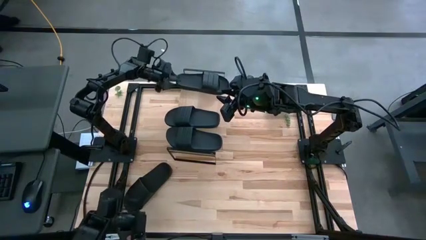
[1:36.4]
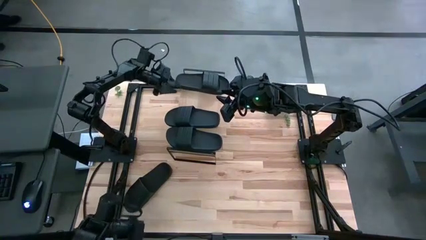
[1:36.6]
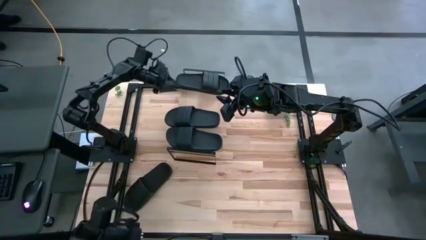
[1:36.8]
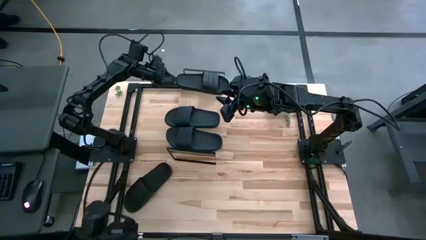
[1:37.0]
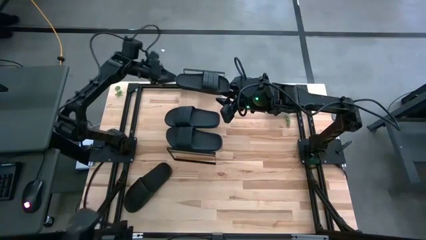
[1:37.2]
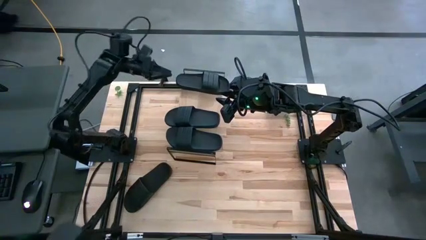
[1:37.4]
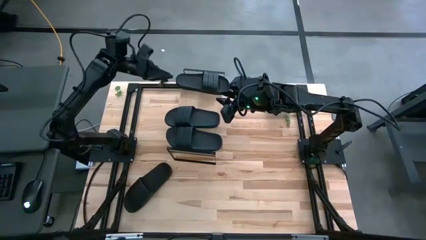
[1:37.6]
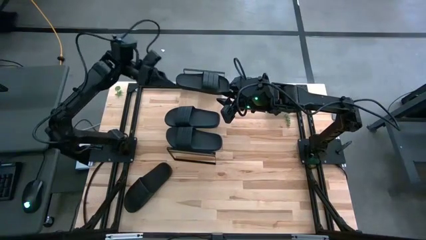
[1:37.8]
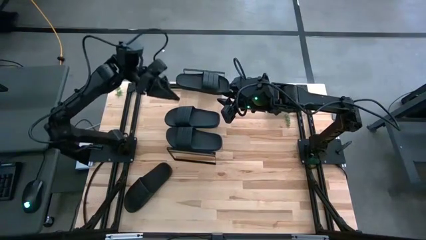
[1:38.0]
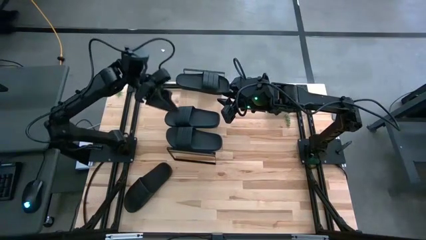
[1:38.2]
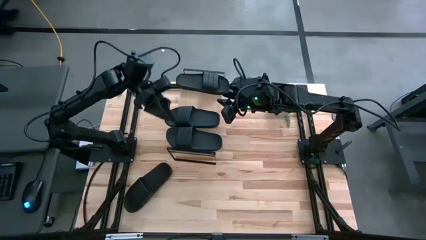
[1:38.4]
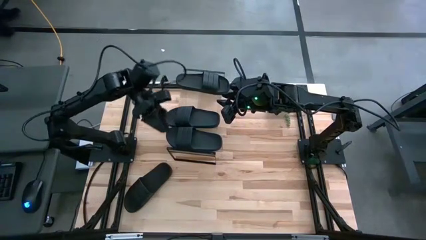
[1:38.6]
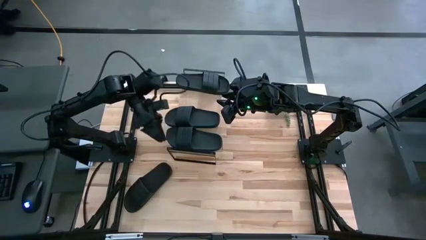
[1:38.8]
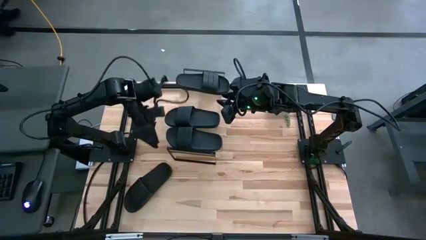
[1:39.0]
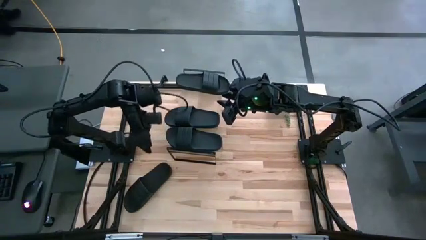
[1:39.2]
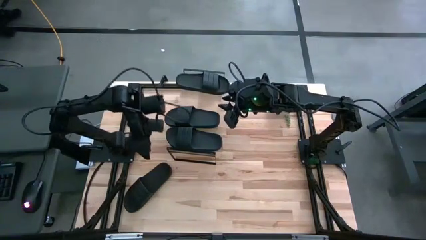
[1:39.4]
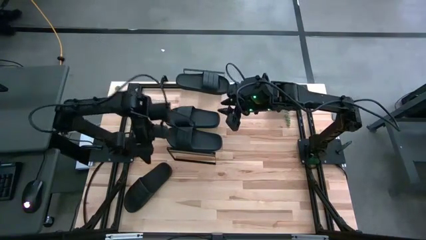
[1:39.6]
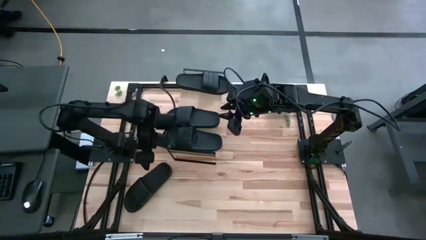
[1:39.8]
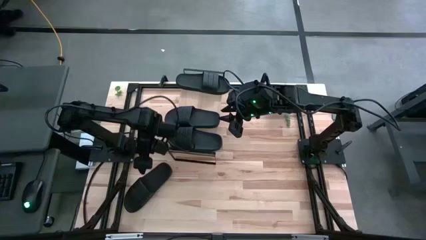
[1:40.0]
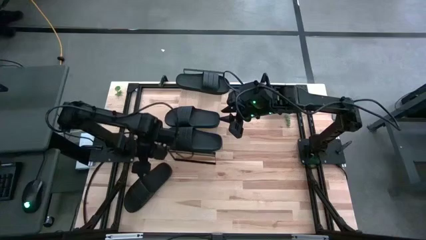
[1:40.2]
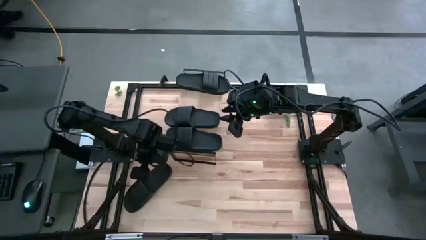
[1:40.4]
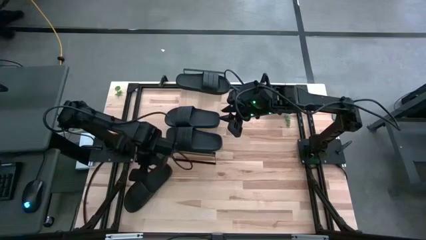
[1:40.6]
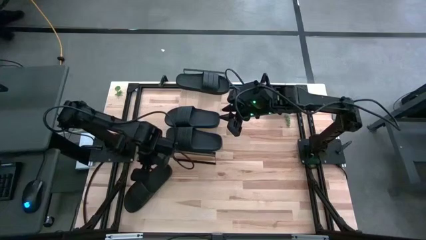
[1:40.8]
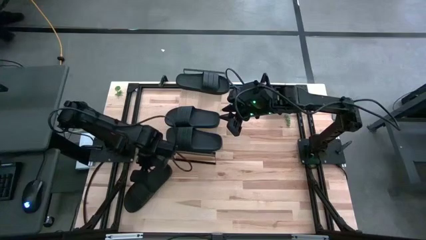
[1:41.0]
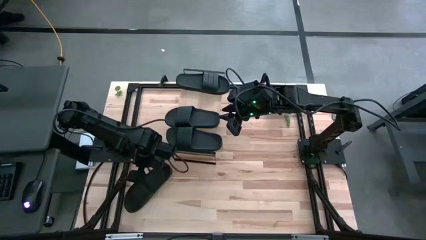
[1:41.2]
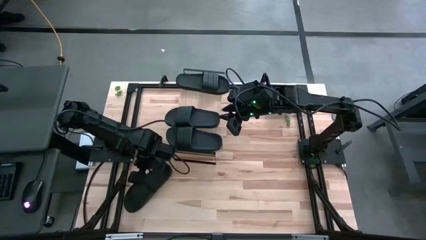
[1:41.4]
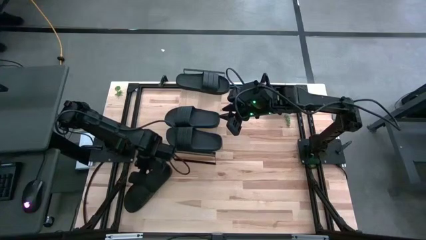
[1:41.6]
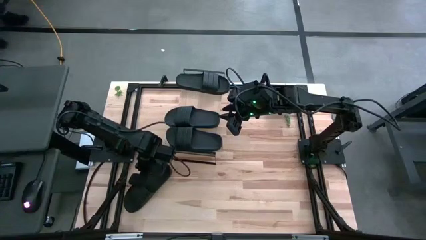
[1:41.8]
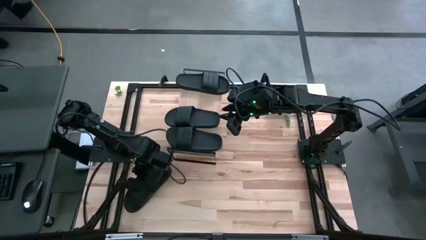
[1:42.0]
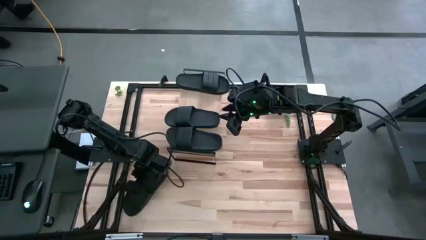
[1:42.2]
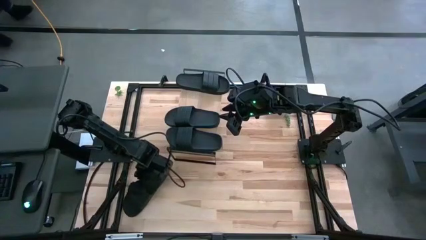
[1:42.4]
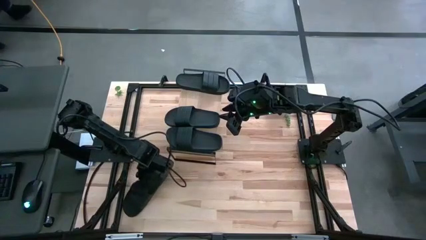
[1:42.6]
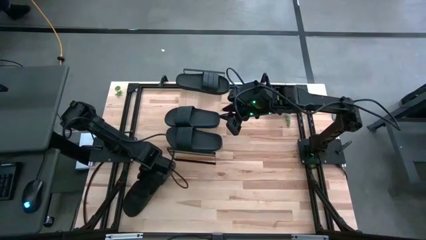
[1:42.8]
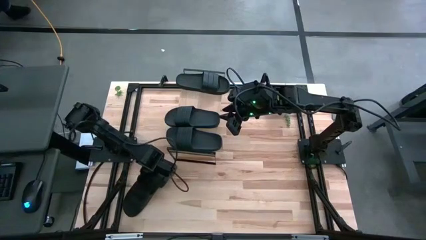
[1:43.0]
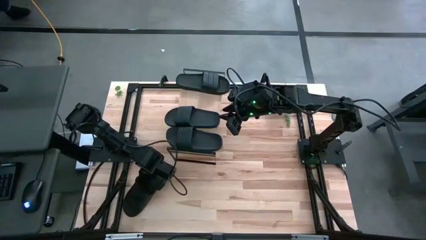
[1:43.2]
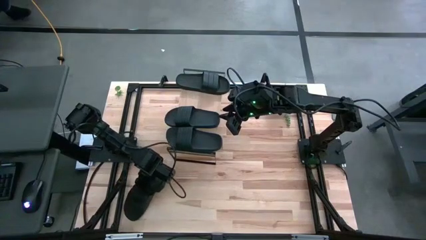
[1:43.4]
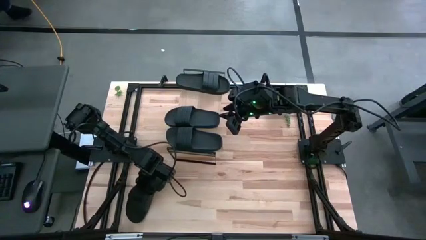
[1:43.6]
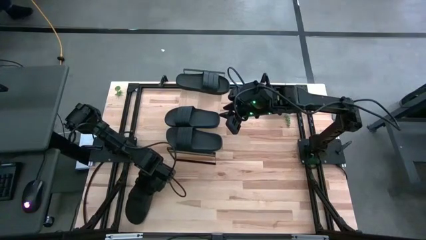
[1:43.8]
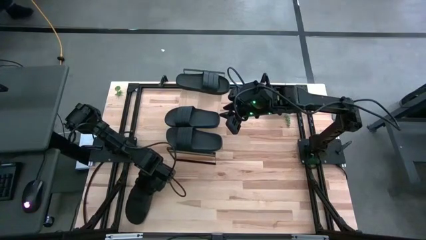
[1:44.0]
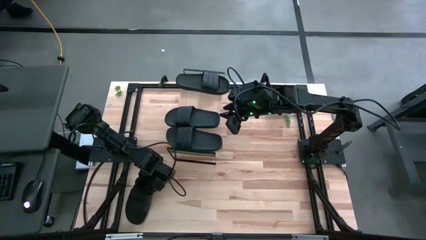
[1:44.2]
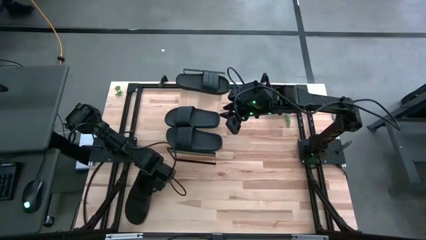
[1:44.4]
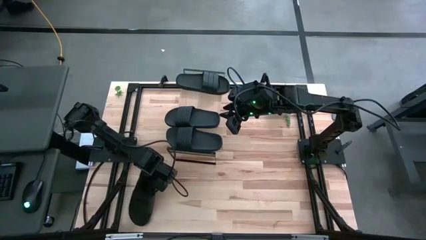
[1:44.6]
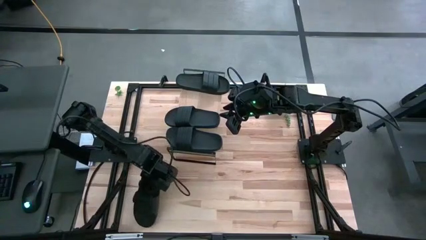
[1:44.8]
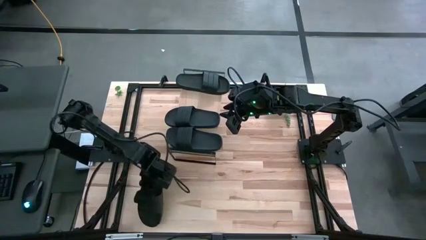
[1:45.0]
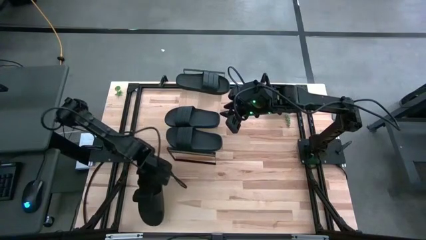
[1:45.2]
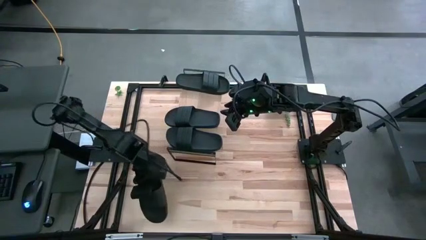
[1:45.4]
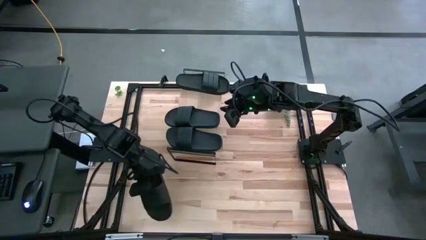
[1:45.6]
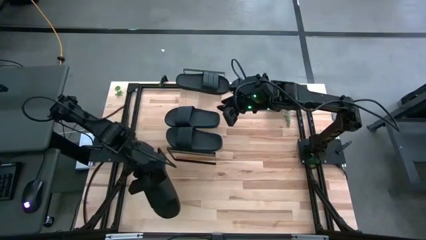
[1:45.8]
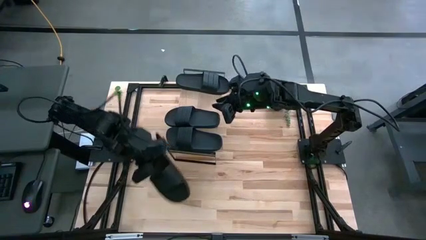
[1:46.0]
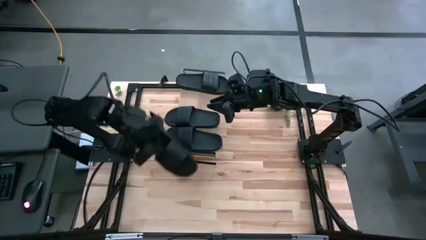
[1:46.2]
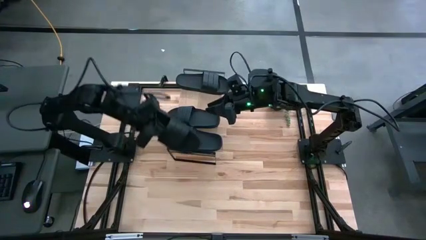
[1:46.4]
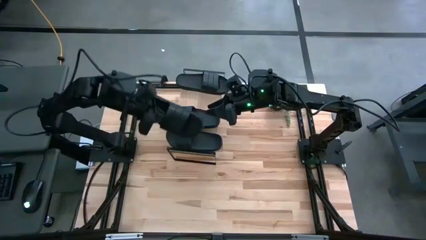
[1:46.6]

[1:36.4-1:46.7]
Task: Pick and place slides into the shelf
Put the slipper on the shelf

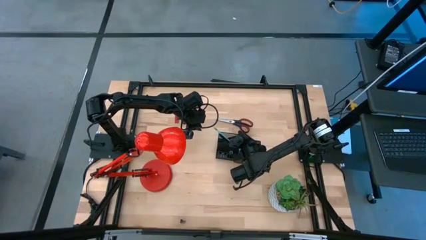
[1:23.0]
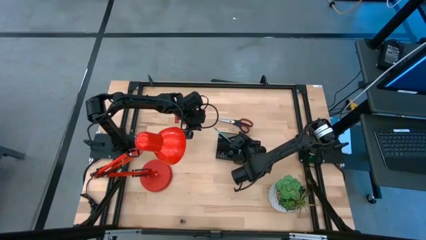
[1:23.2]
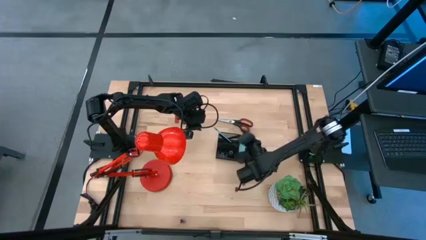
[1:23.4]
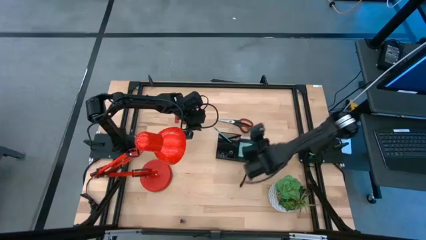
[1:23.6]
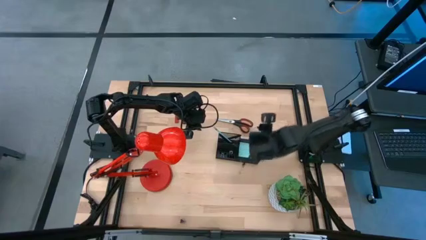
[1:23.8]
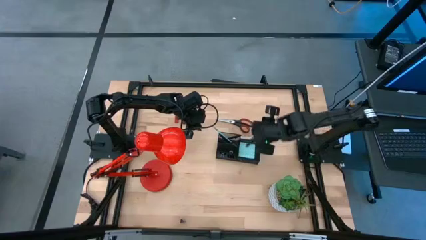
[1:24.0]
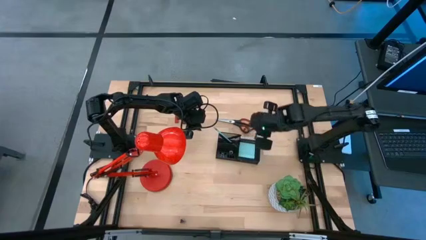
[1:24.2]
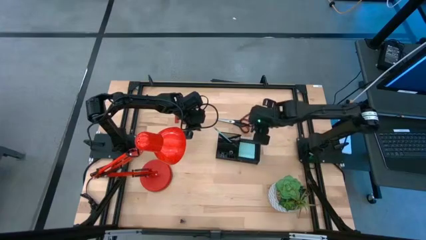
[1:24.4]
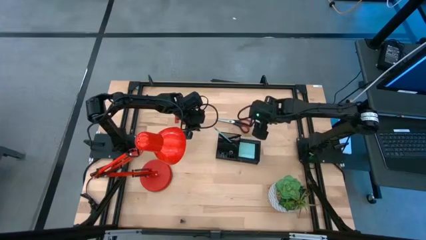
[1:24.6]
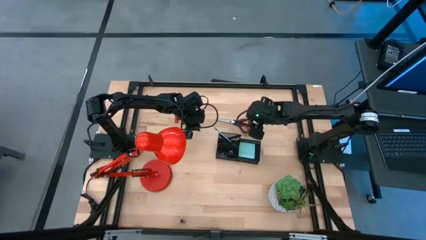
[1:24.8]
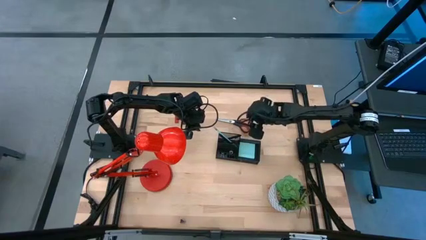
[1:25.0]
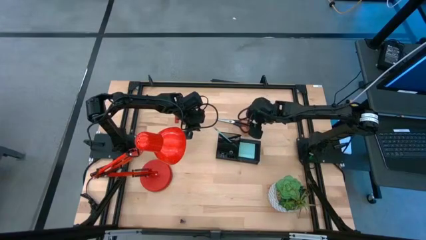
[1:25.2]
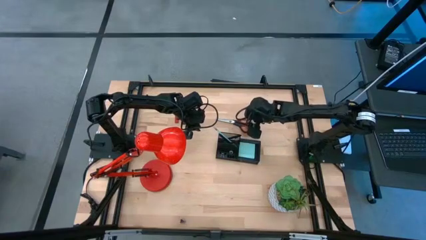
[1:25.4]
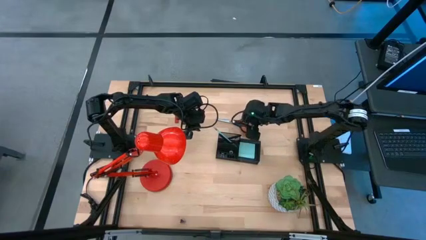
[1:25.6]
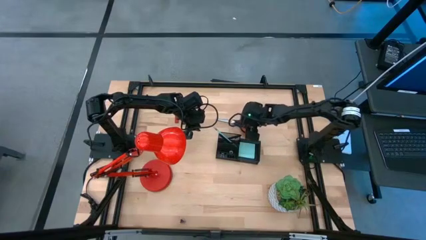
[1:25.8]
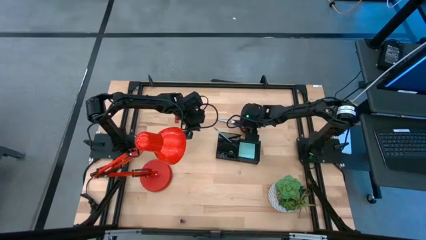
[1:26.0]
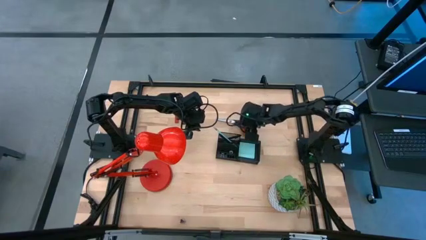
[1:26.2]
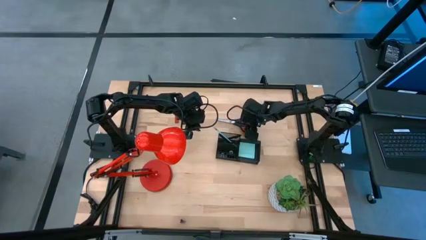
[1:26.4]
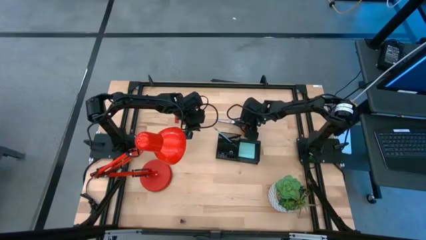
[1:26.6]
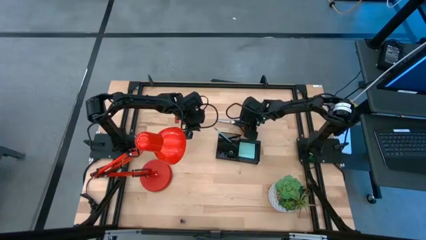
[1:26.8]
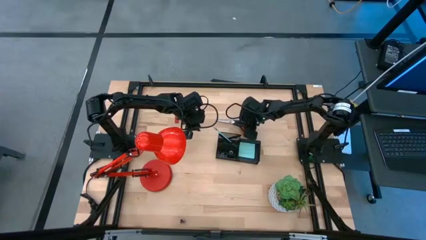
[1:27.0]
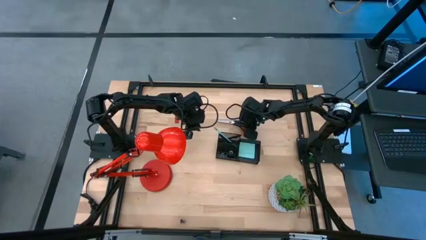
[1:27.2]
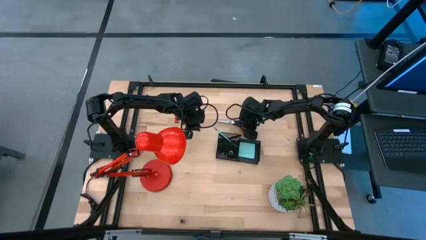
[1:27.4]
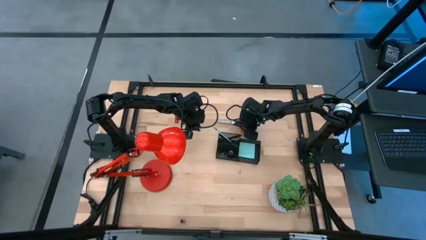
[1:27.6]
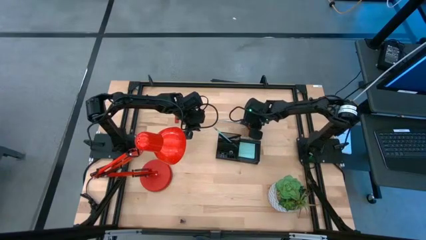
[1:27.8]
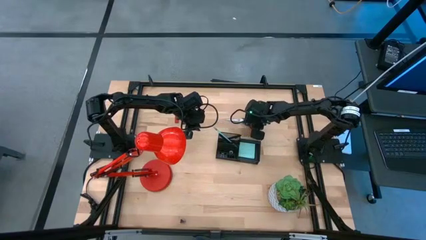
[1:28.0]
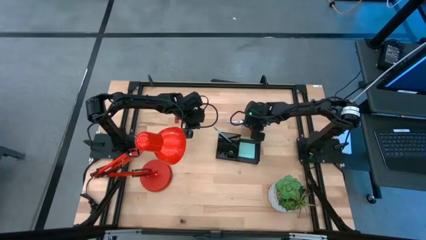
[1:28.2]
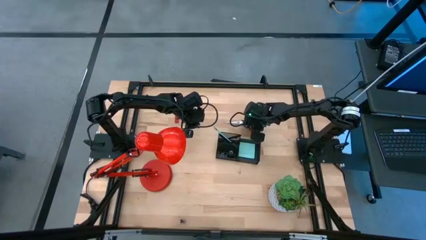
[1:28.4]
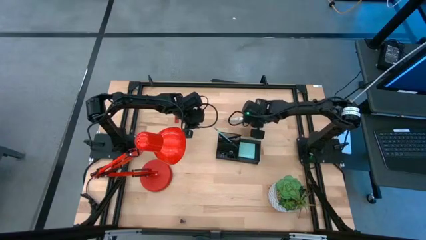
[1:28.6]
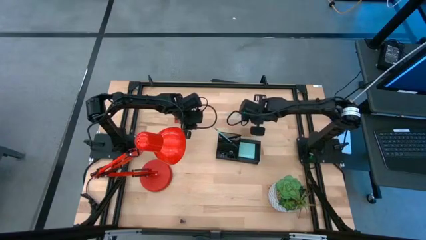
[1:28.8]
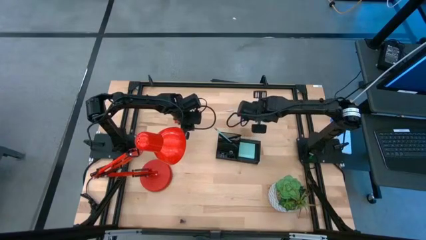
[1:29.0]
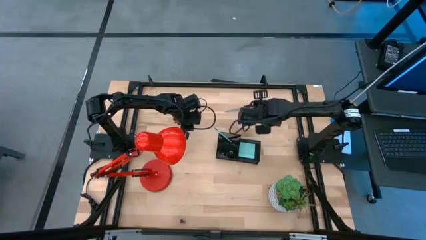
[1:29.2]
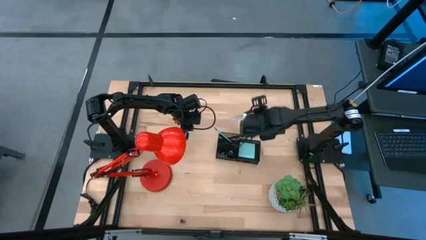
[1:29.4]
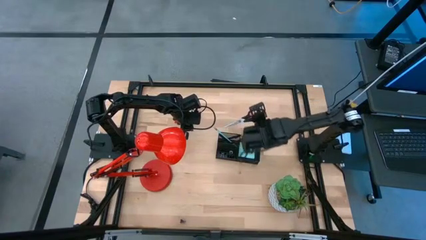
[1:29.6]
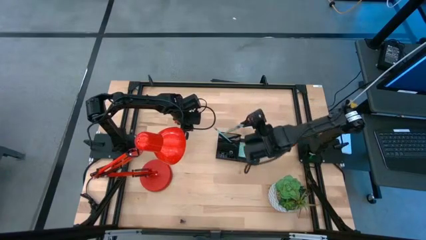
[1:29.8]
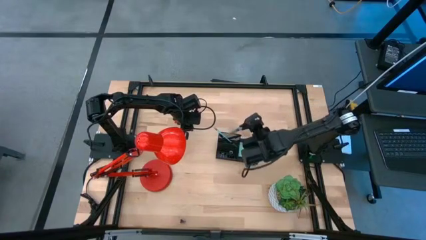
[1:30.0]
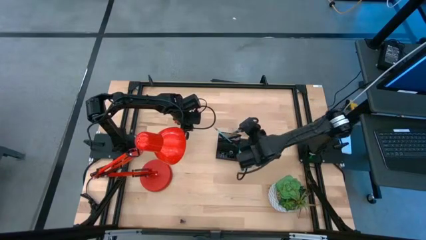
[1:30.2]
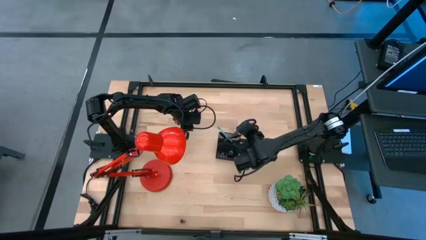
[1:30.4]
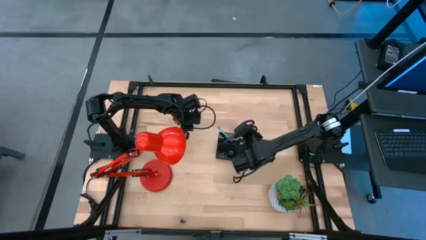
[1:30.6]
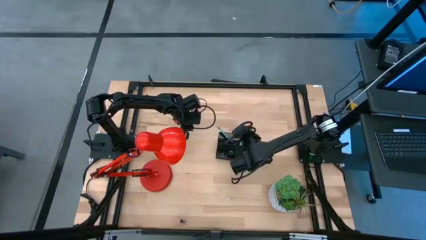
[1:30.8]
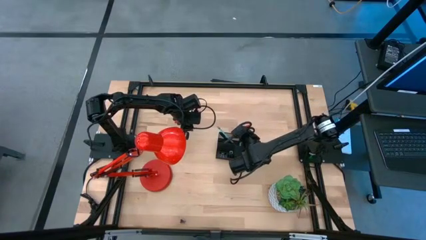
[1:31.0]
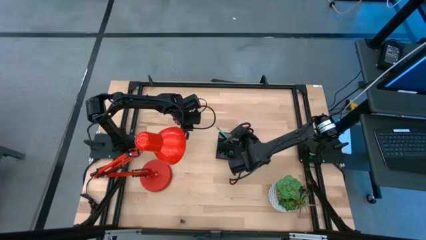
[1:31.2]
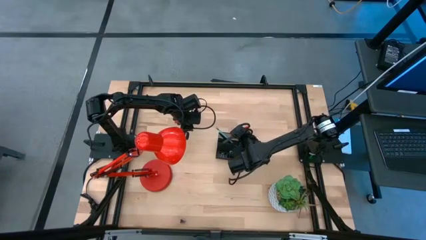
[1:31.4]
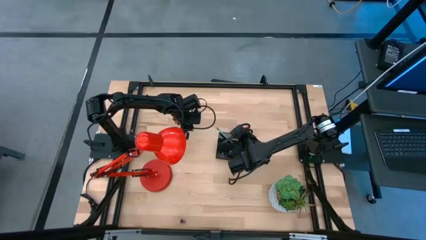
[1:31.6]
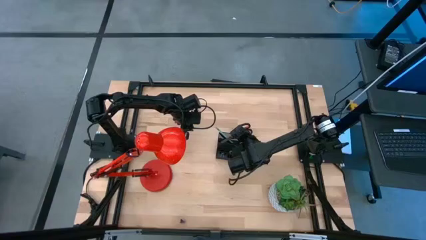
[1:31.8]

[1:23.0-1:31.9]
Task: Pick and place office supplies into organizer
Put the black scissors into the black desk organizer
